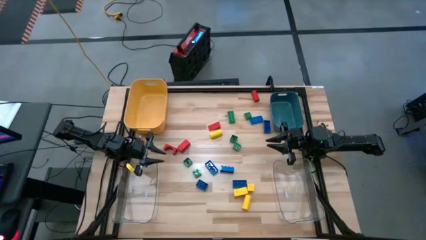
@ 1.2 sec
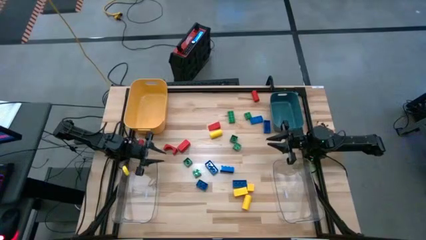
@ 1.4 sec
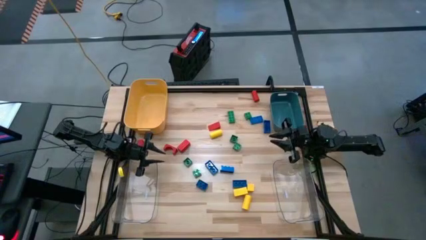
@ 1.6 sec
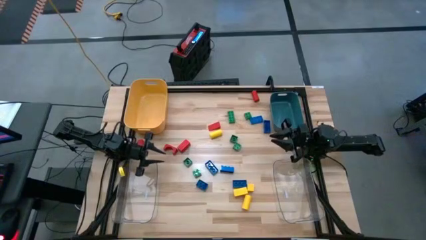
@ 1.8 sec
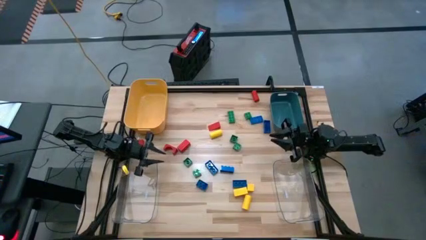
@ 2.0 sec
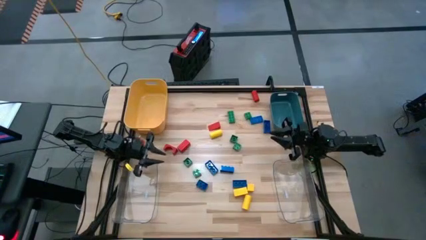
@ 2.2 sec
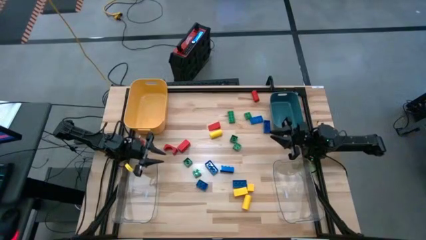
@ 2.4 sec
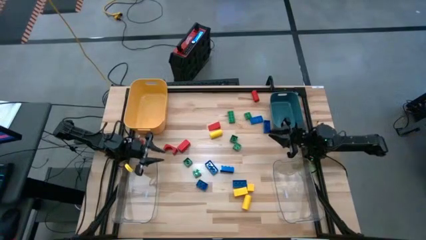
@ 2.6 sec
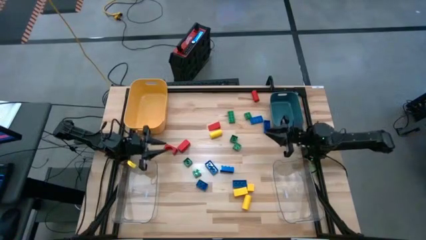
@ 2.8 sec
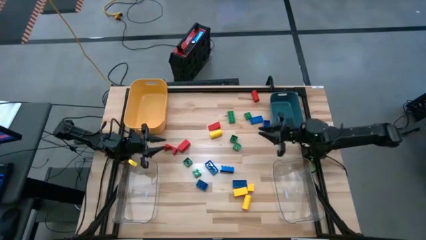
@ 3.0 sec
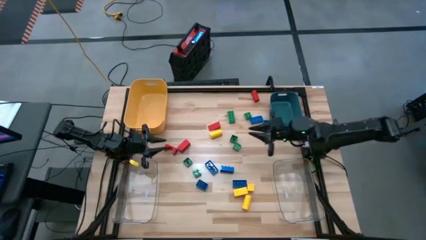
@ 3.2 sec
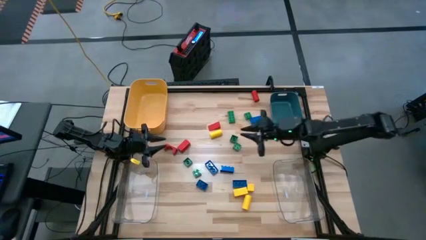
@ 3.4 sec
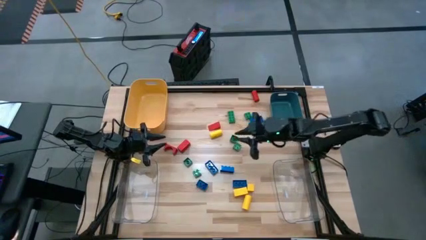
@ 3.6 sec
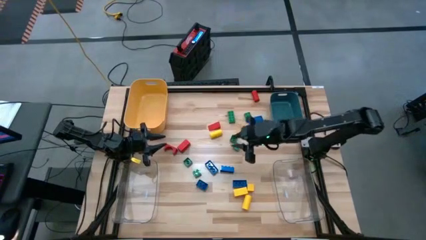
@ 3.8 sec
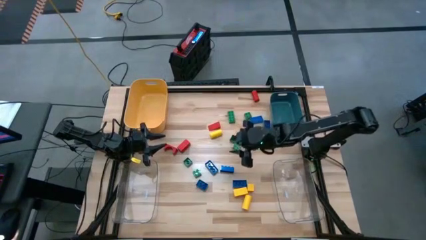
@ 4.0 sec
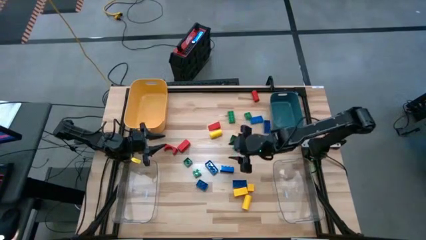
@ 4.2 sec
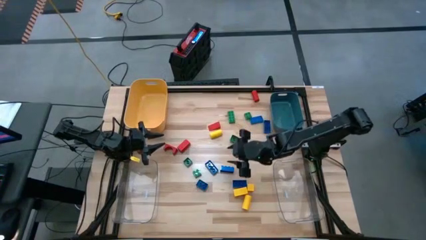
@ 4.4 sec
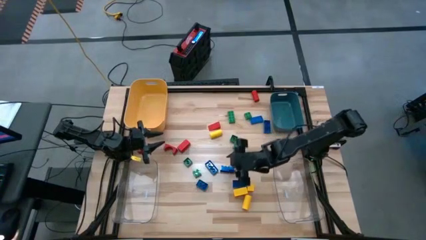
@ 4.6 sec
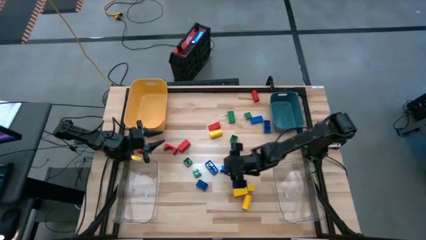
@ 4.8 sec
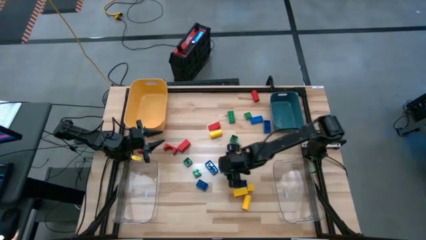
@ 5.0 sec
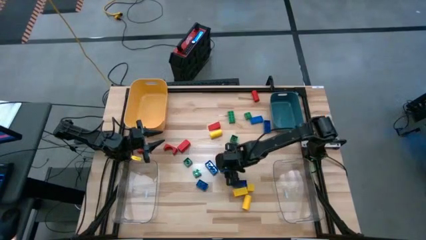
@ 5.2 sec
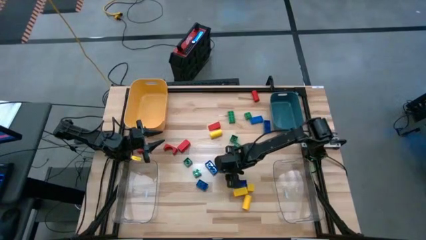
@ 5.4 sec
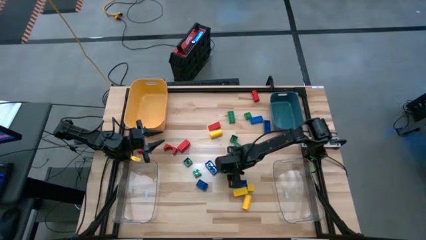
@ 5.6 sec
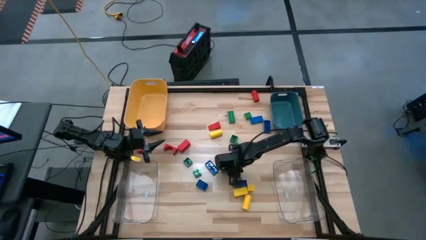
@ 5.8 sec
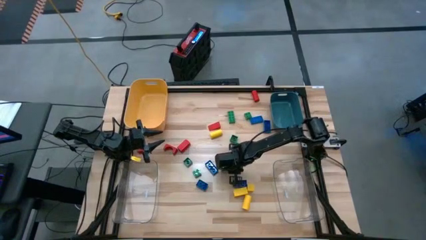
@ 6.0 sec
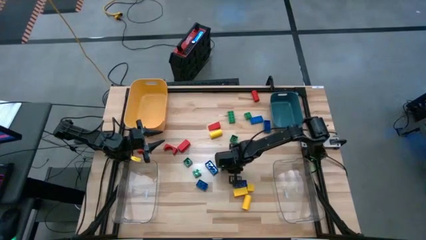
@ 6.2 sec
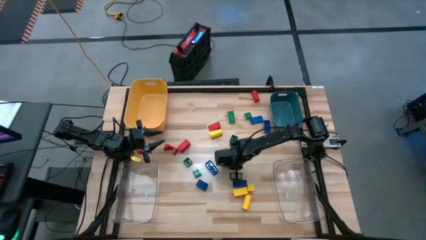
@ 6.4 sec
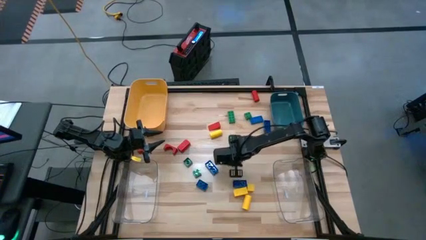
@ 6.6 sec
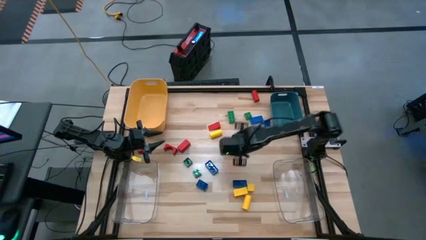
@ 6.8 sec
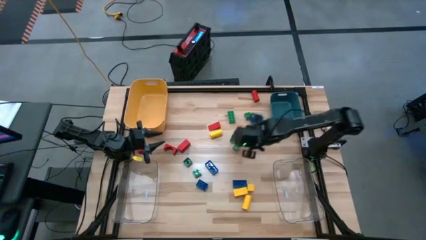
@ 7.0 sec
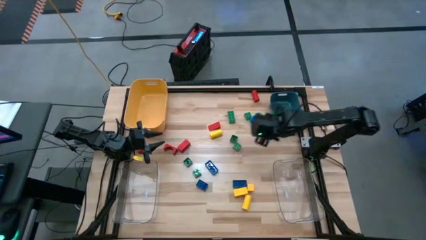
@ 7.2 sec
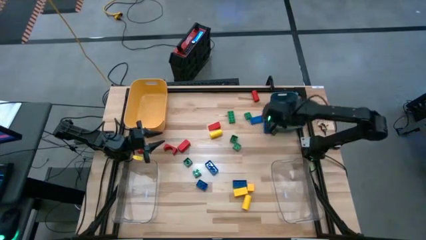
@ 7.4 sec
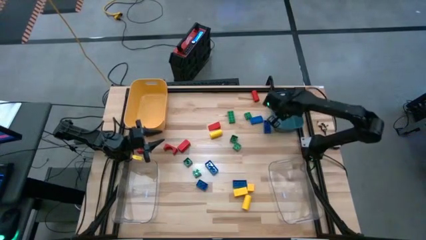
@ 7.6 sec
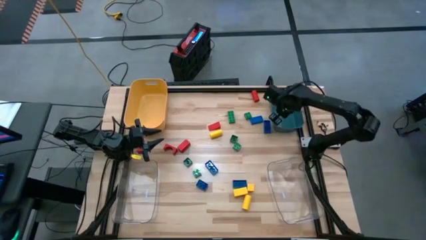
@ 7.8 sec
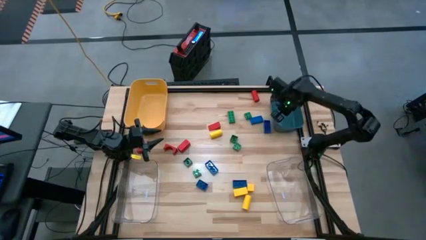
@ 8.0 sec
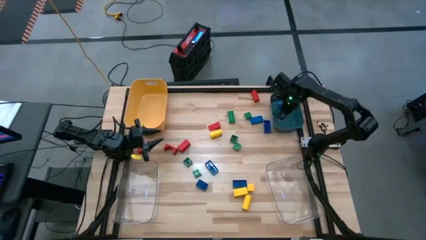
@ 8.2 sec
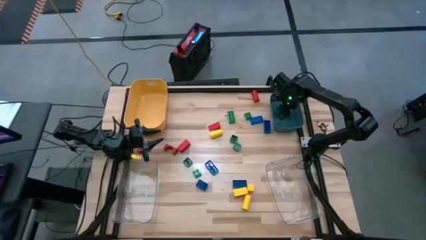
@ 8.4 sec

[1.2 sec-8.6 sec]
Task: Sort blocks
Put the blue game piece into the blue bin

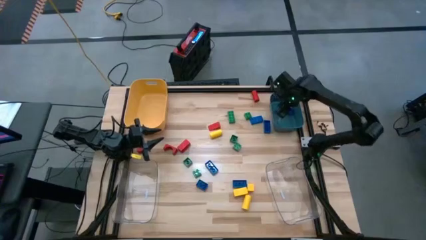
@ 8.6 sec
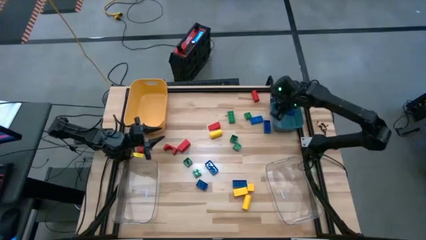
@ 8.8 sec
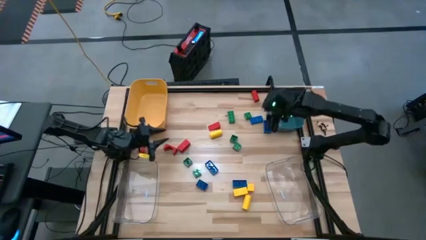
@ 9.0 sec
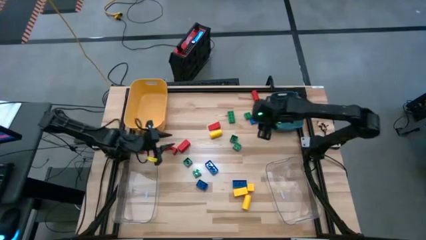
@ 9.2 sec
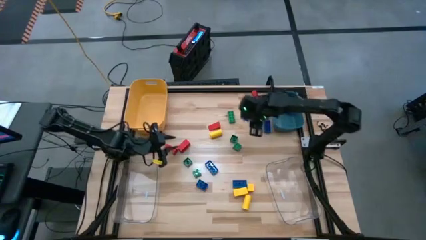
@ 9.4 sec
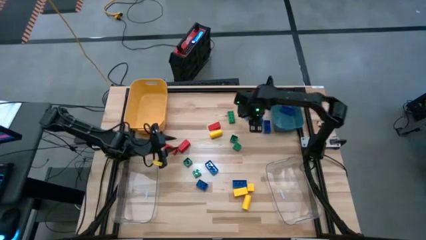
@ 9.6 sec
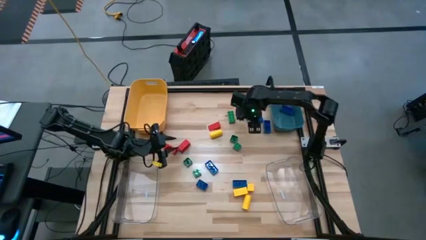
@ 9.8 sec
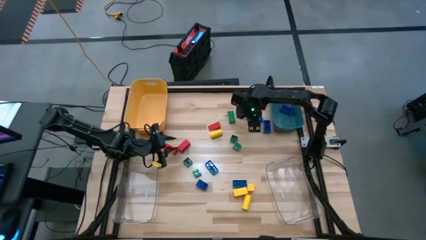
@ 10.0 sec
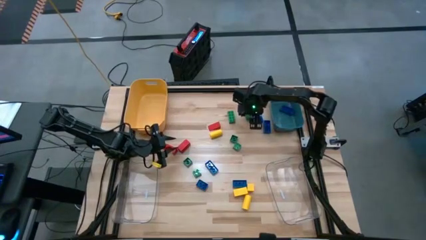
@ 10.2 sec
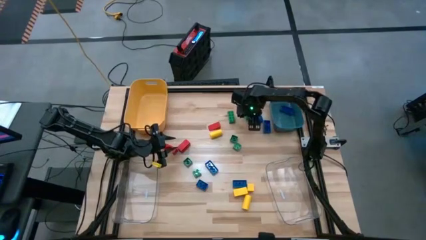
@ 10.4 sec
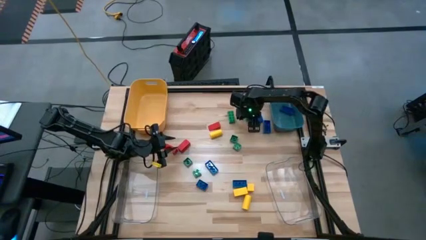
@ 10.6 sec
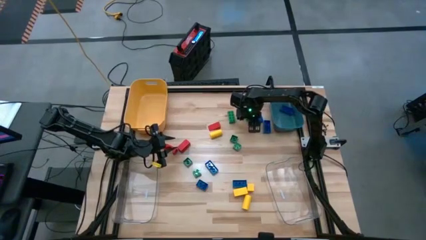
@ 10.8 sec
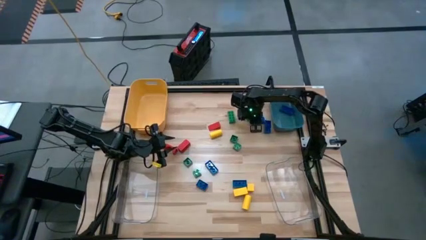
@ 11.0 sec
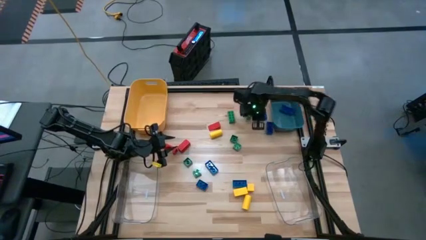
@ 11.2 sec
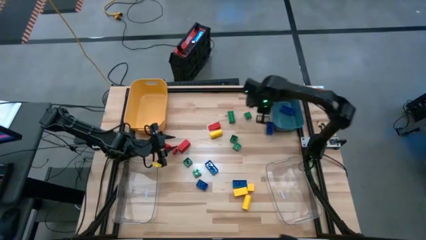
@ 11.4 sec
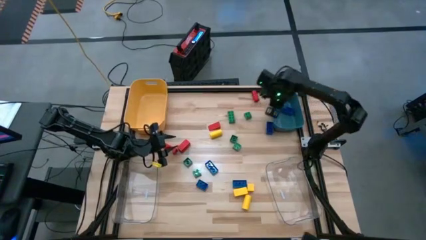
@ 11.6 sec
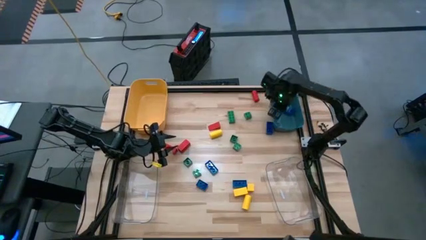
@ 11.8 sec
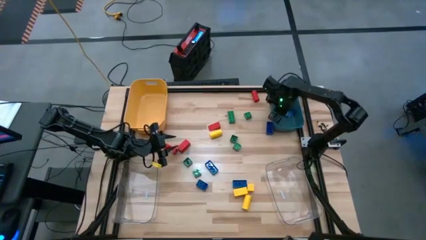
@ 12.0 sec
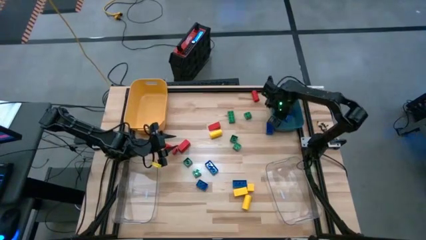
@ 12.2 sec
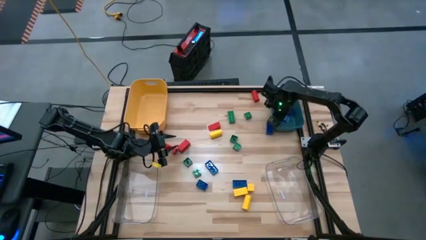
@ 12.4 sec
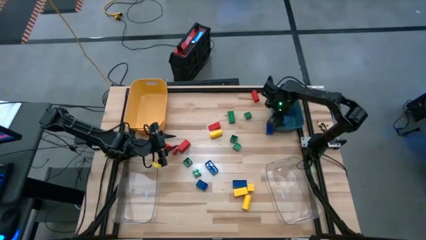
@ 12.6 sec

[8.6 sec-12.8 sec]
Put the blue game piece into the blue bin

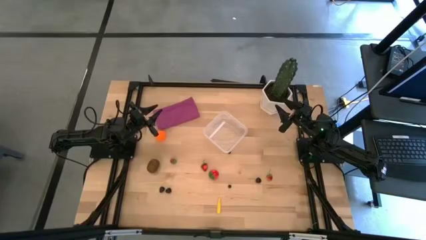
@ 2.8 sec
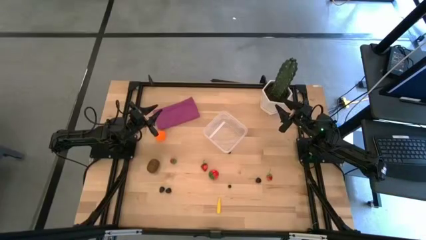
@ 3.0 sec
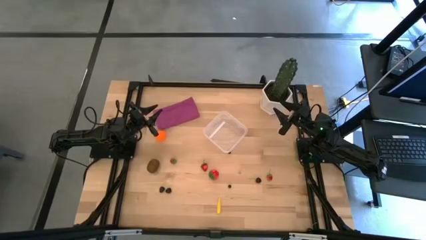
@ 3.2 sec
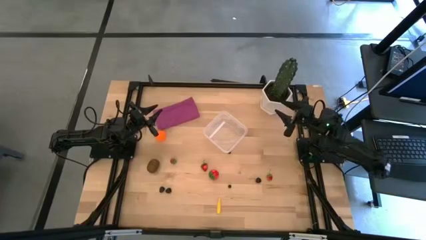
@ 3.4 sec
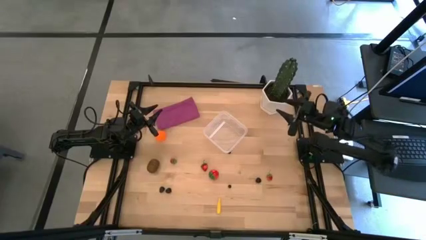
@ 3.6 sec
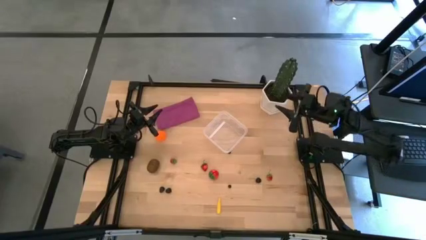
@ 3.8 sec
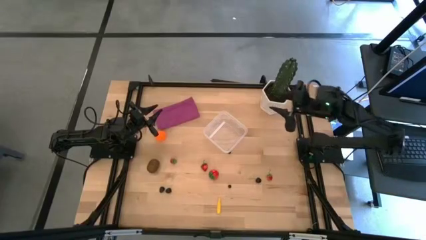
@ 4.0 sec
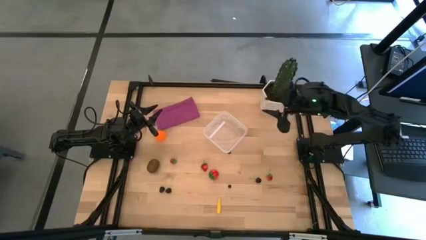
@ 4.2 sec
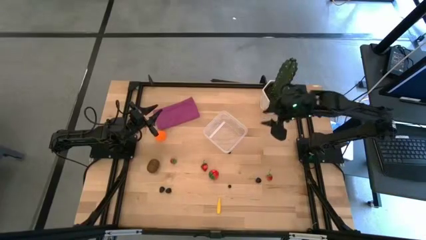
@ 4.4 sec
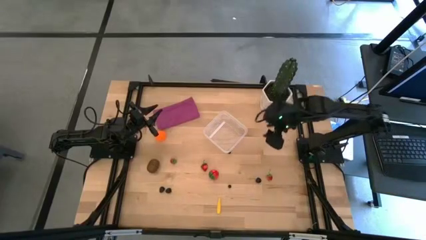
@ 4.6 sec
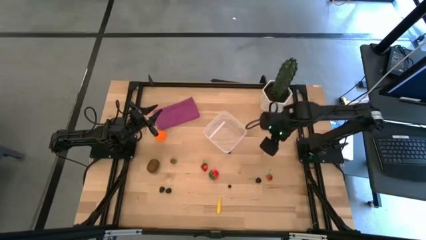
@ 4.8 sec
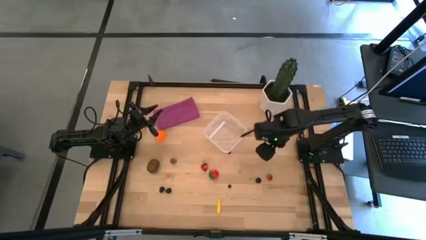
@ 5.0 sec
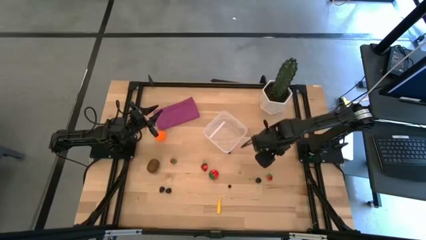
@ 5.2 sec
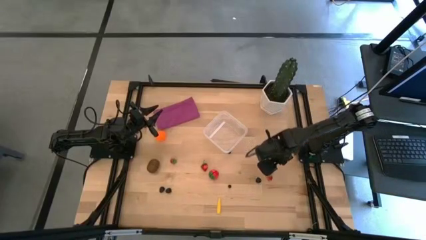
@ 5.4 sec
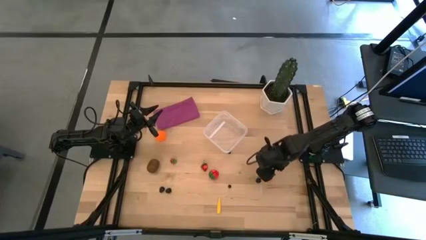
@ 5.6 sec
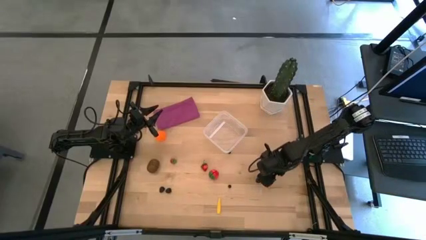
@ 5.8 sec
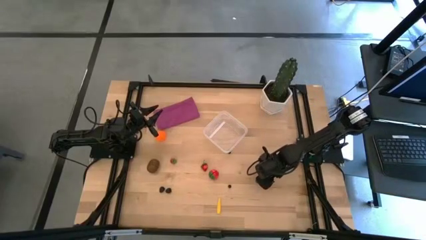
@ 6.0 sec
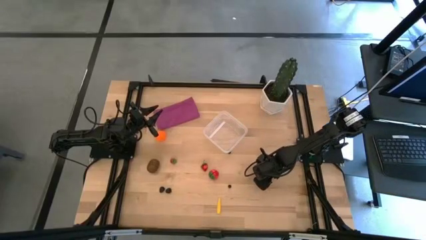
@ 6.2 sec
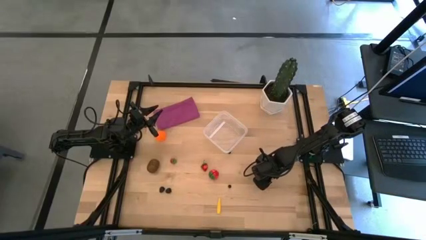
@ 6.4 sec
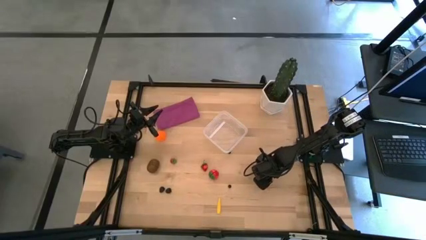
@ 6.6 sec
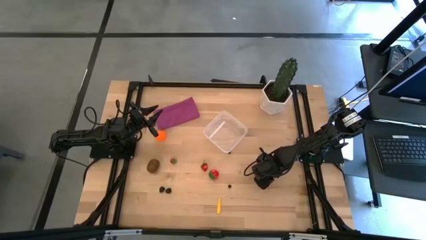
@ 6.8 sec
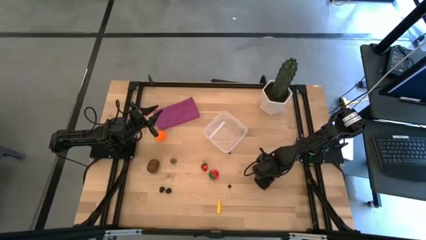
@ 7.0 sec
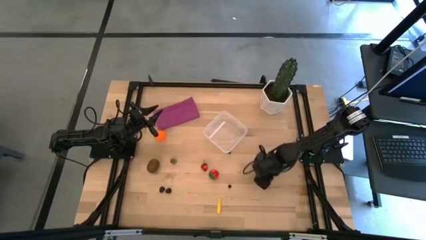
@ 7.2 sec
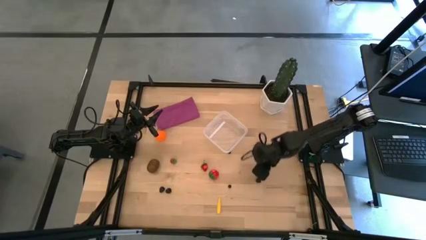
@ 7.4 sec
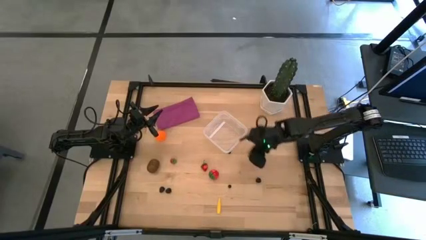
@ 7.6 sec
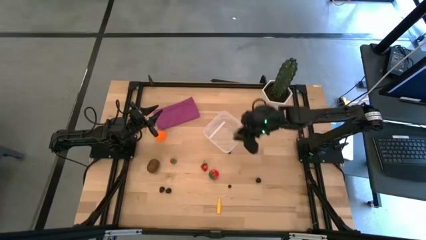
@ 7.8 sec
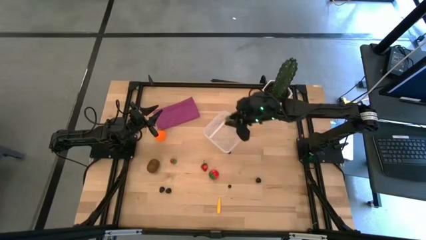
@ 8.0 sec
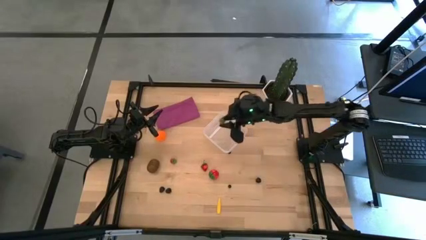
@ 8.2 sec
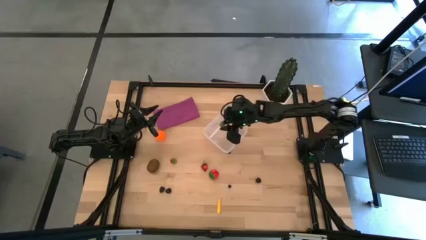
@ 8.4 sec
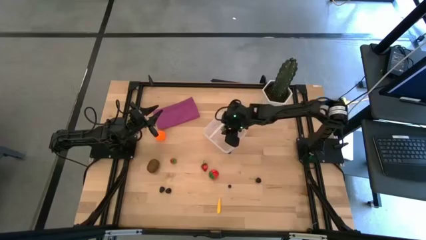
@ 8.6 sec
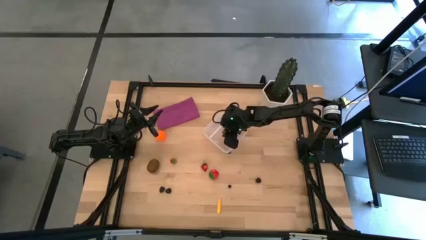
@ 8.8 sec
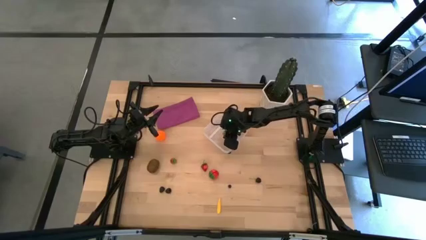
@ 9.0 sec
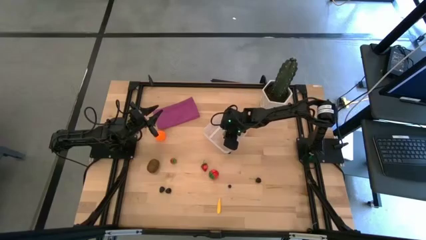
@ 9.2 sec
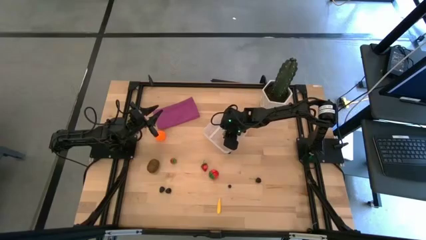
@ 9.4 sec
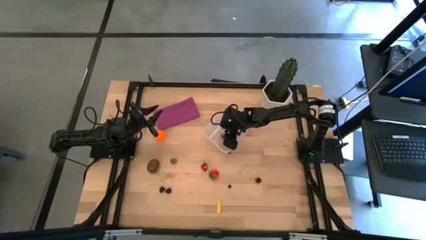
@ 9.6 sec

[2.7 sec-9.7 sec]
Task: Pick and placing Produce into tupperware
Put the right red strawberry into the transparent container
